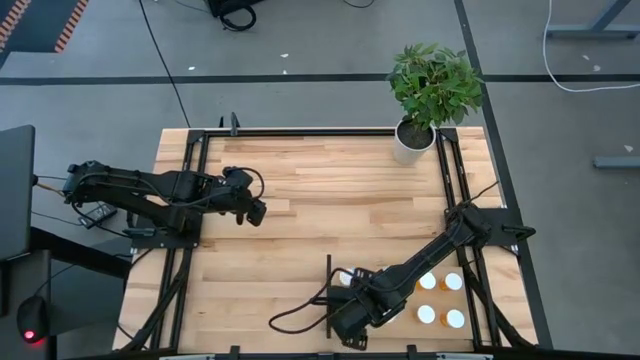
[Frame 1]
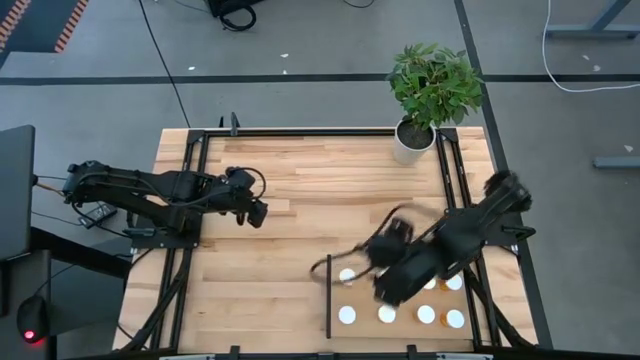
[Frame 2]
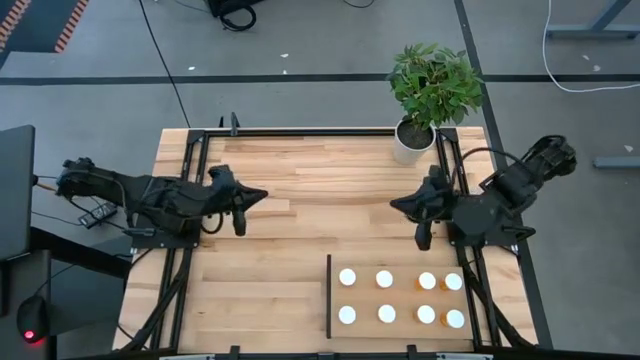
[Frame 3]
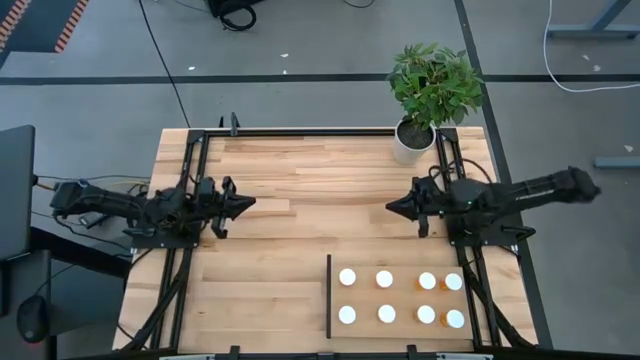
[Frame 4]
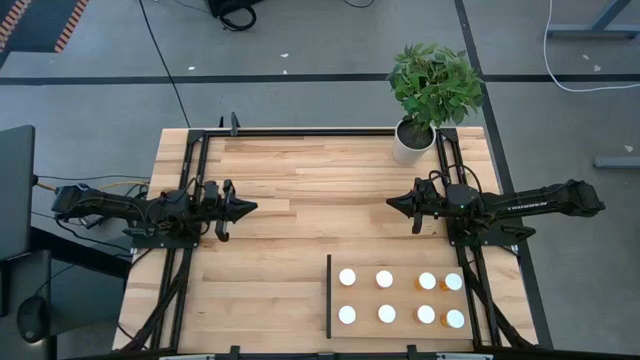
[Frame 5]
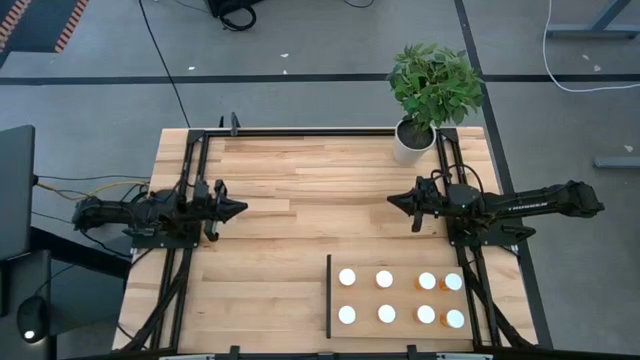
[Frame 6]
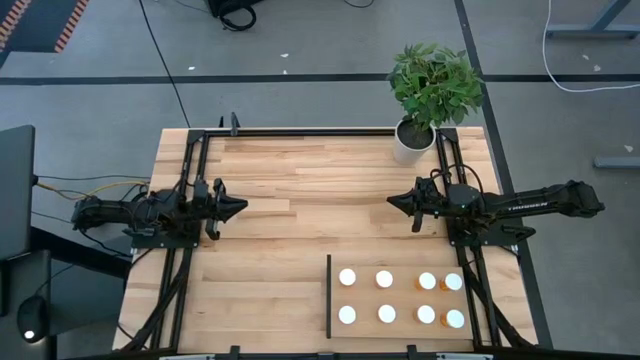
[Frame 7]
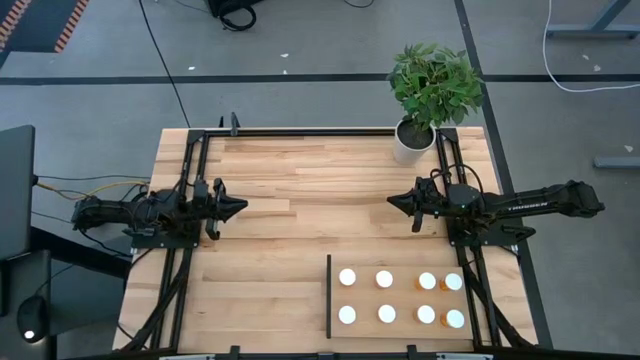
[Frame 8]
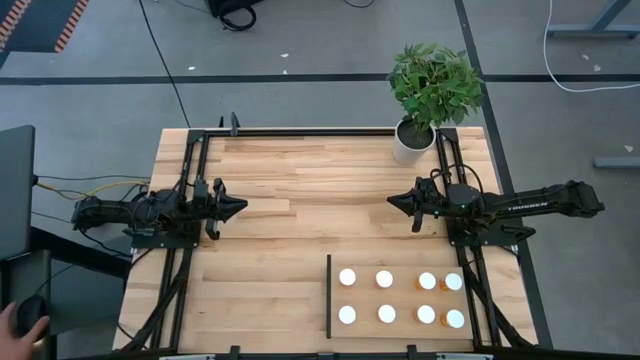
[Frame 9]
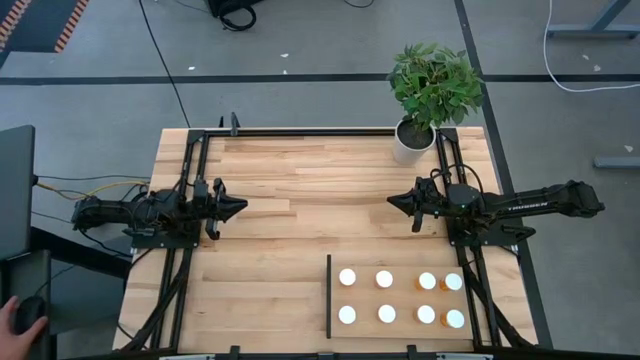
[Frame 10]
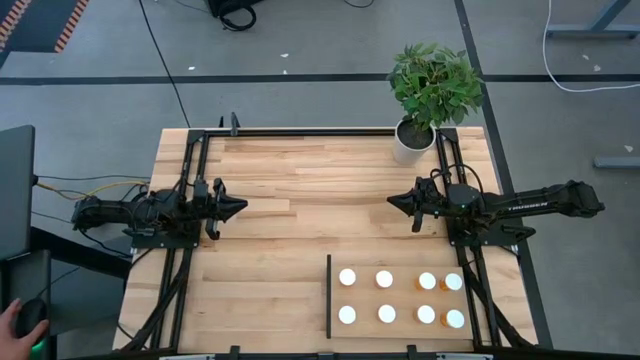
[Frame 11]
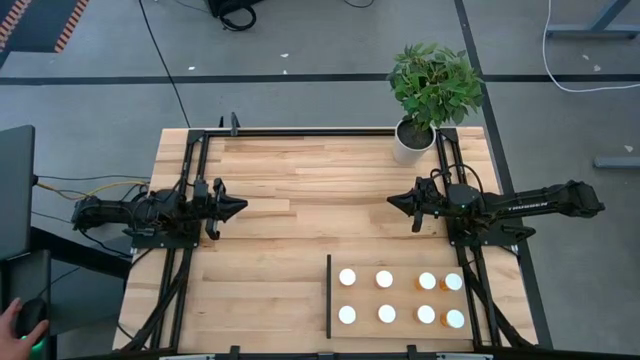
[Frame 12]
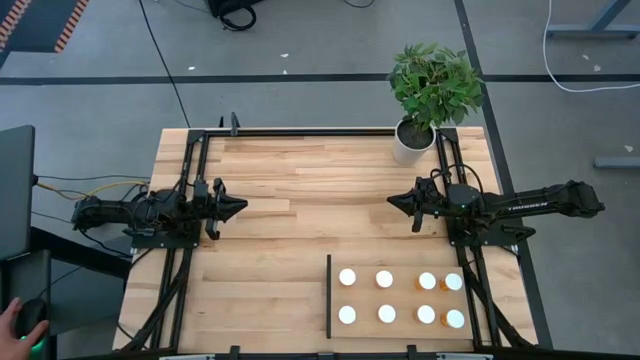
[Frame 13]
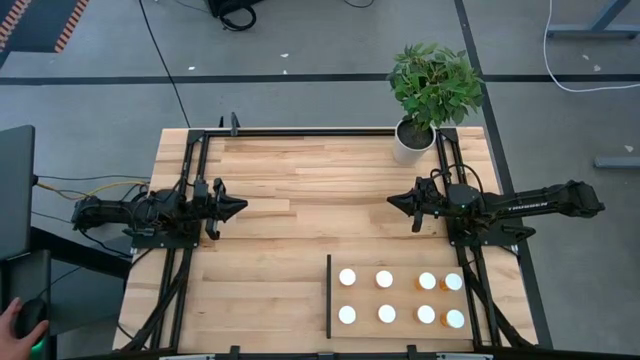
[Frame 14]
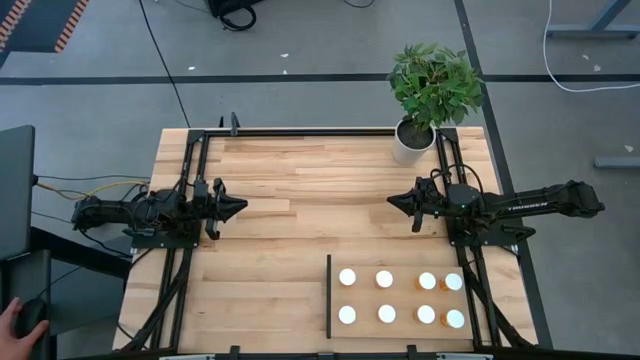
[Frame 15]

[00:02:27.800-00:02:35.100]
Task: Pick and place medicine bottles onto shelf by color
Return to Home Position

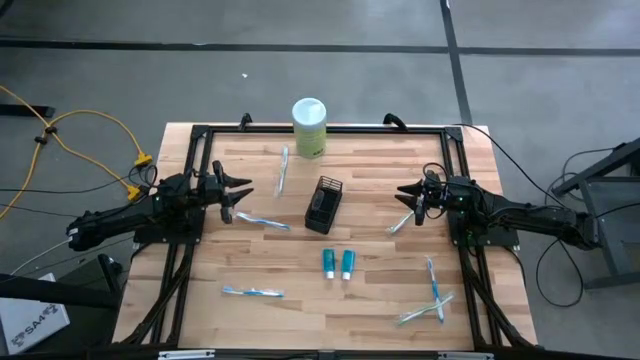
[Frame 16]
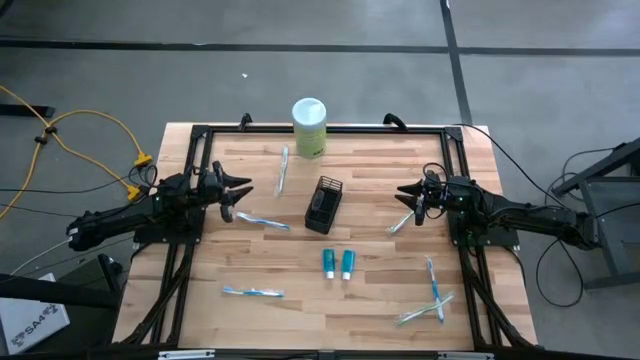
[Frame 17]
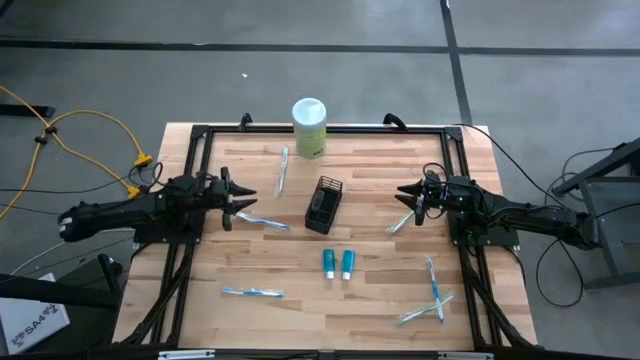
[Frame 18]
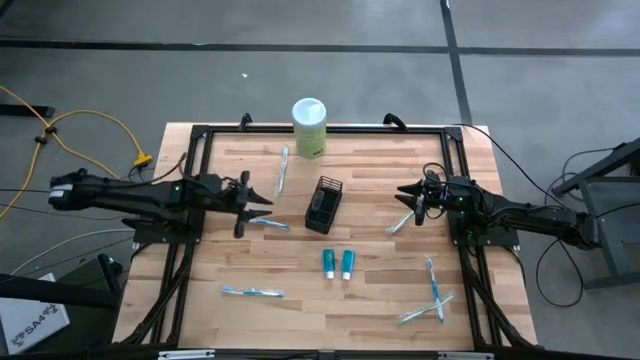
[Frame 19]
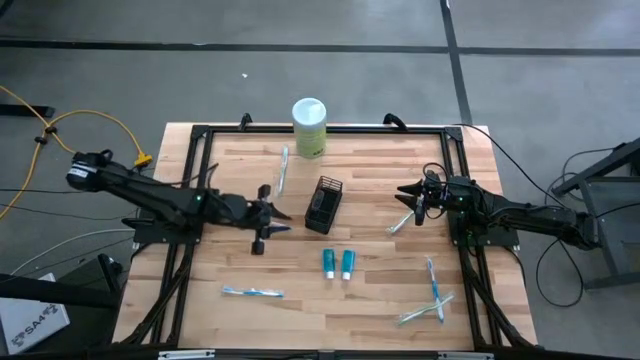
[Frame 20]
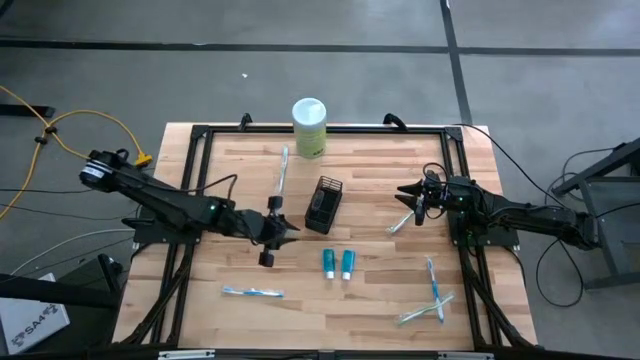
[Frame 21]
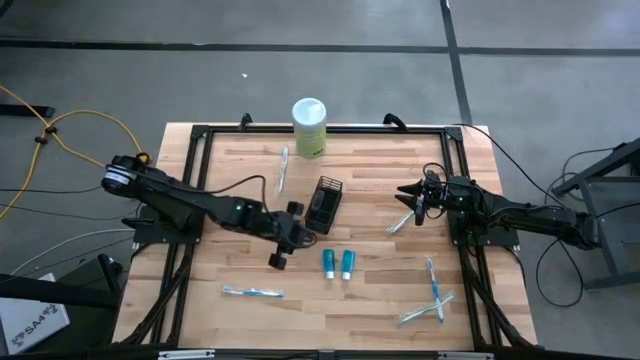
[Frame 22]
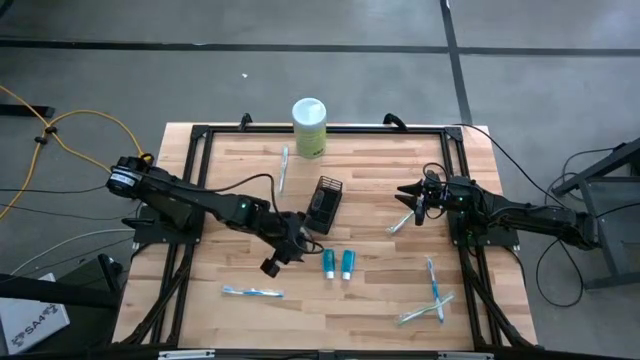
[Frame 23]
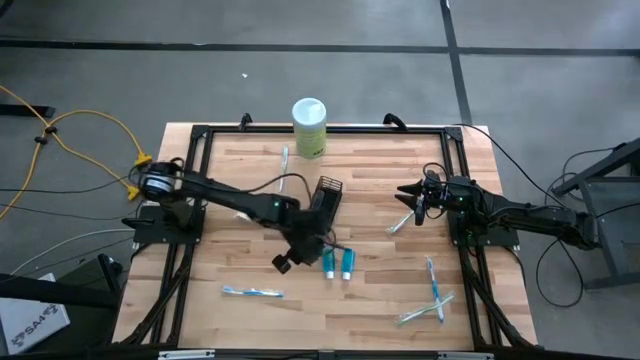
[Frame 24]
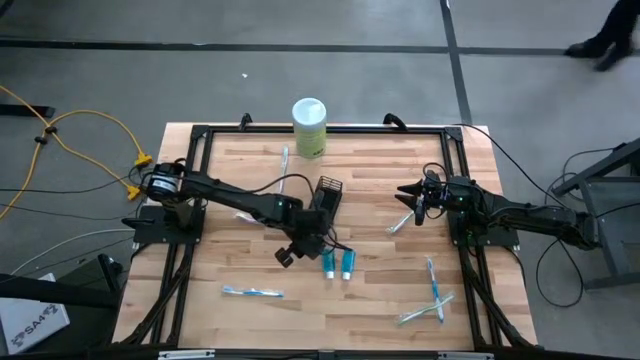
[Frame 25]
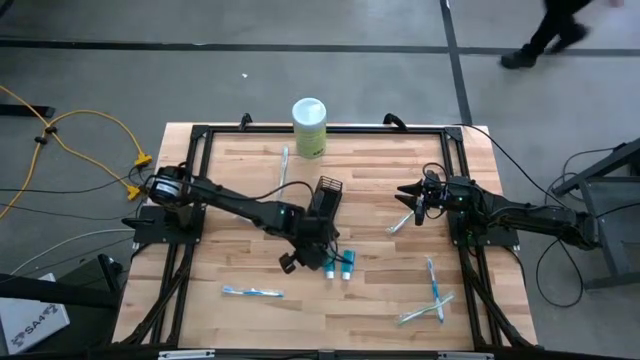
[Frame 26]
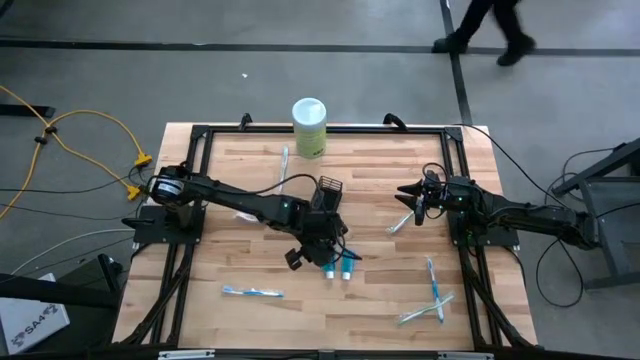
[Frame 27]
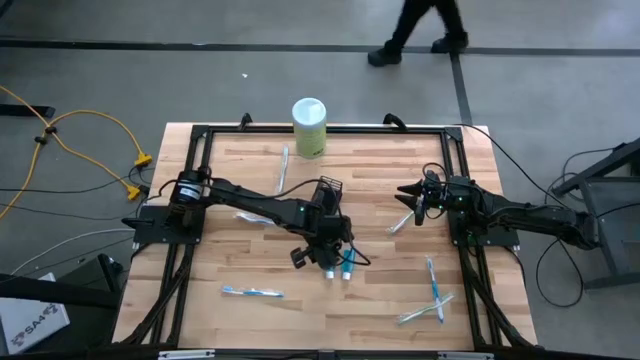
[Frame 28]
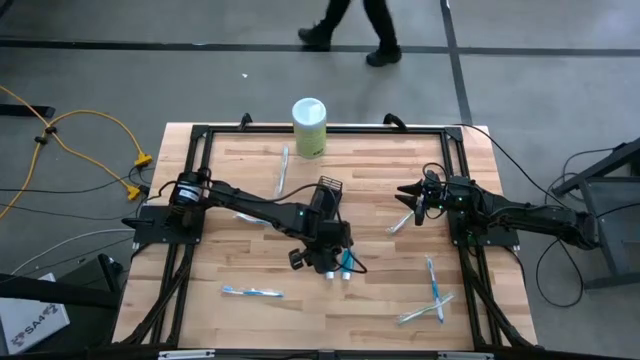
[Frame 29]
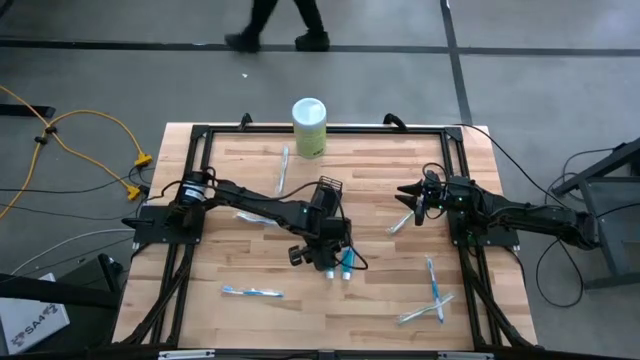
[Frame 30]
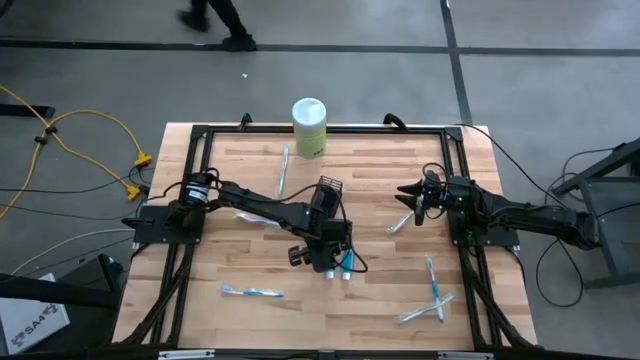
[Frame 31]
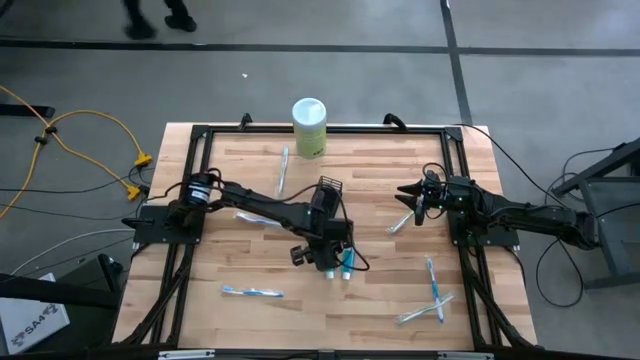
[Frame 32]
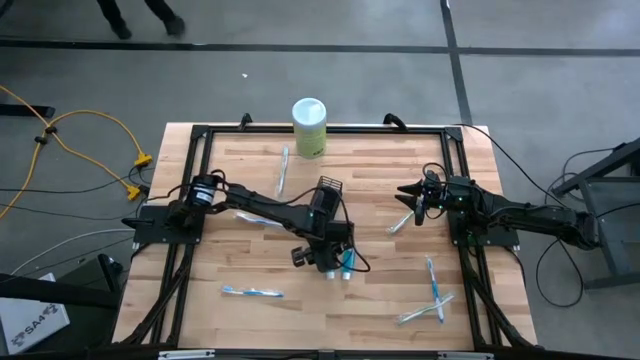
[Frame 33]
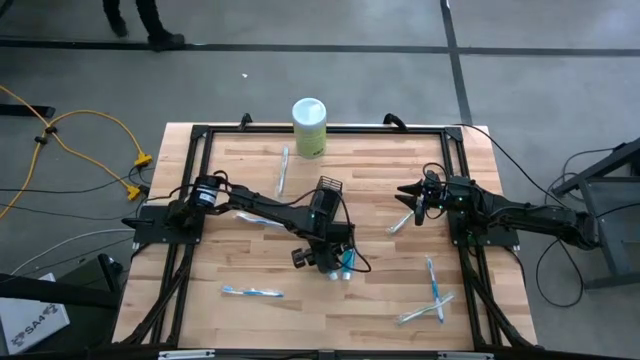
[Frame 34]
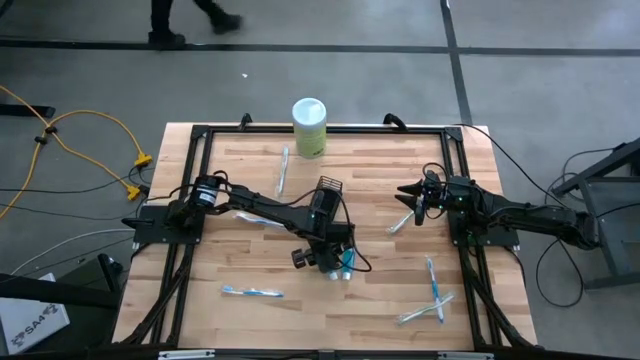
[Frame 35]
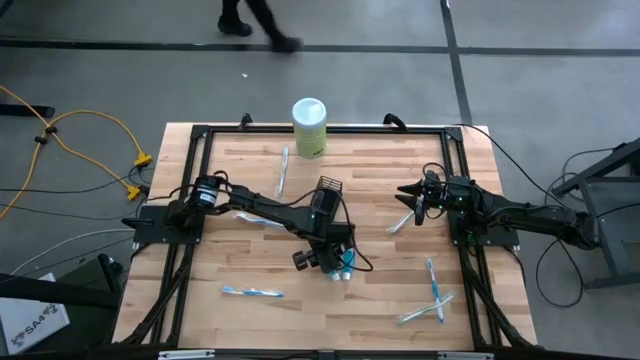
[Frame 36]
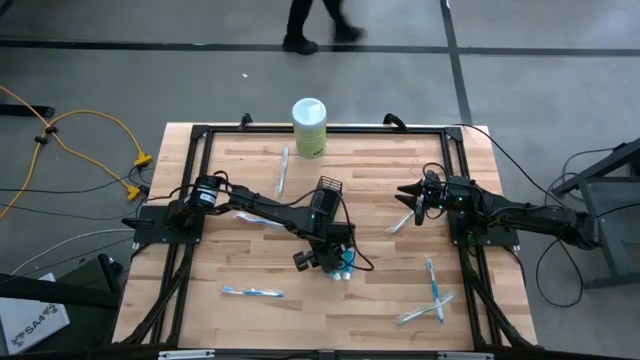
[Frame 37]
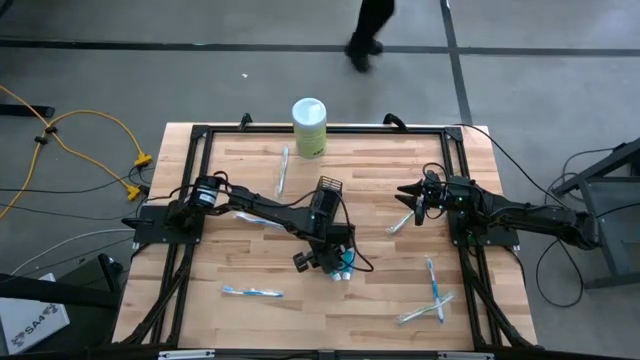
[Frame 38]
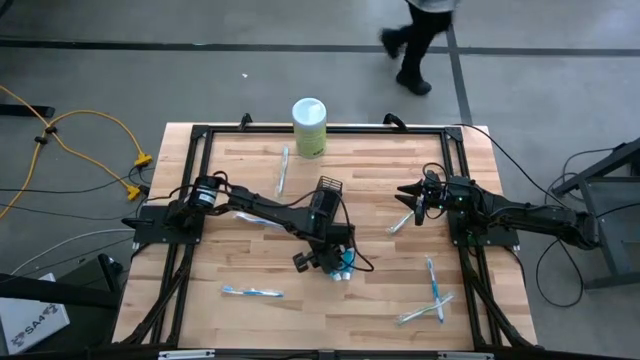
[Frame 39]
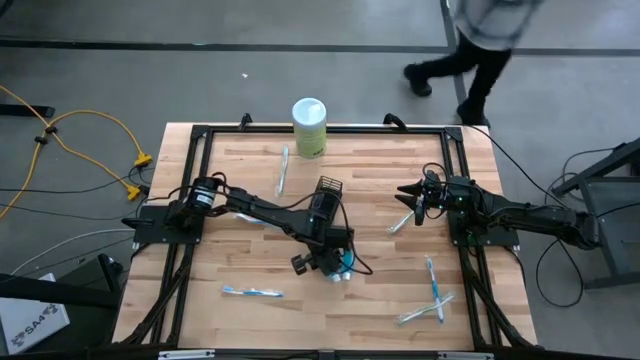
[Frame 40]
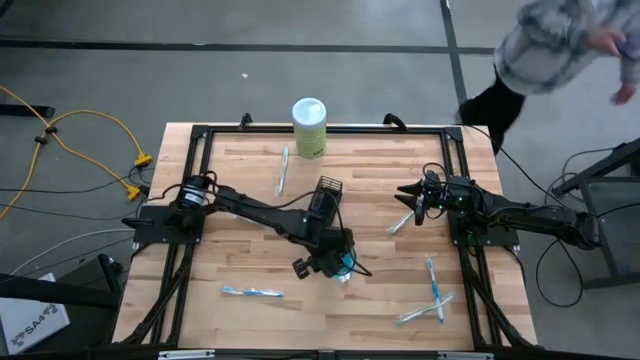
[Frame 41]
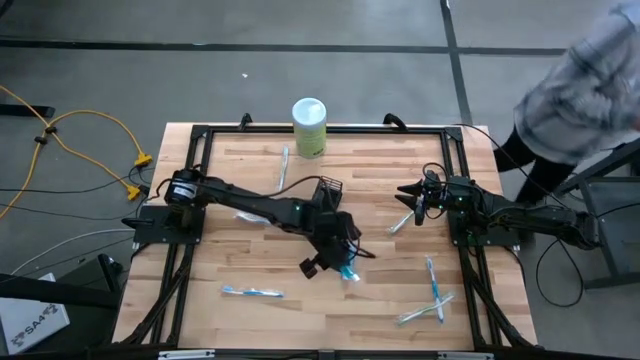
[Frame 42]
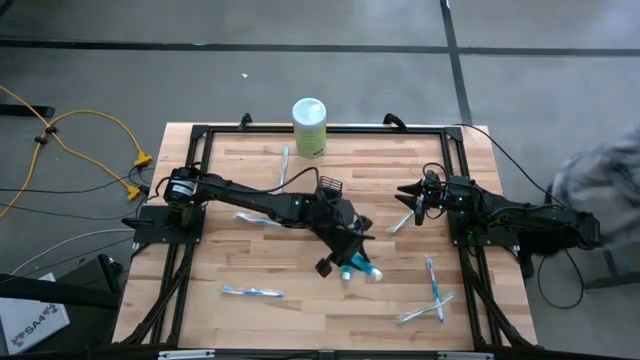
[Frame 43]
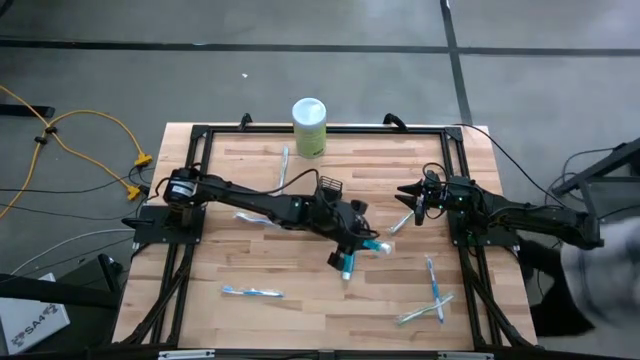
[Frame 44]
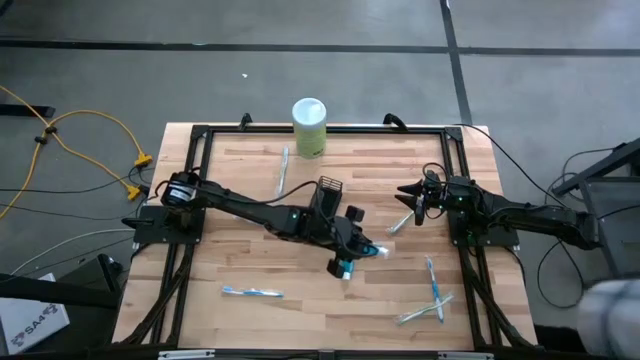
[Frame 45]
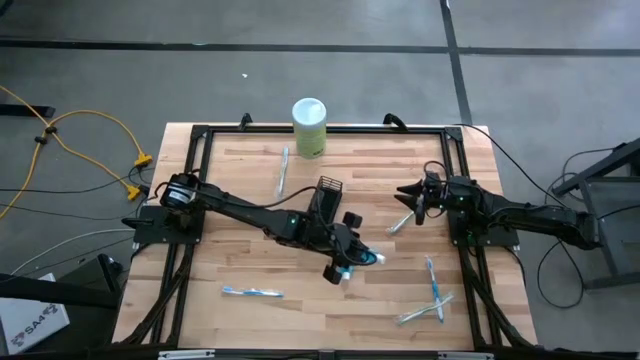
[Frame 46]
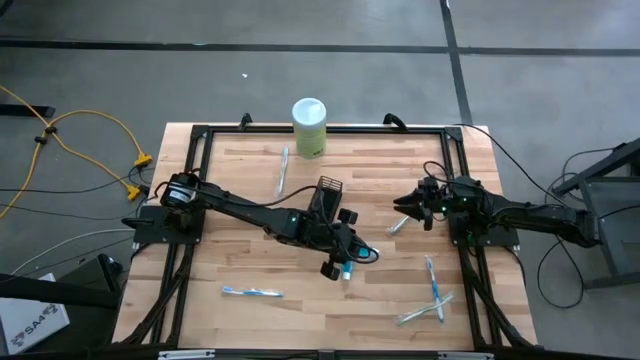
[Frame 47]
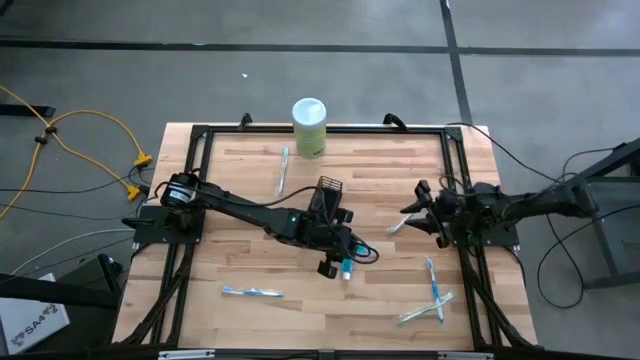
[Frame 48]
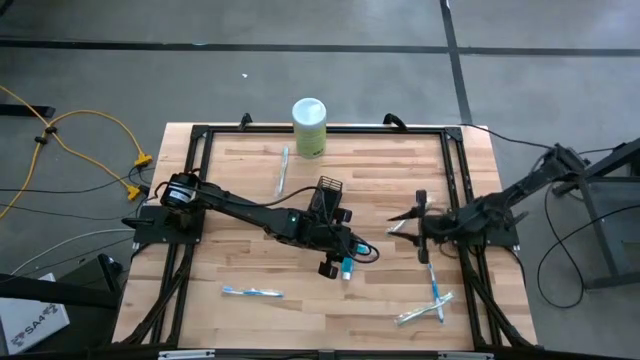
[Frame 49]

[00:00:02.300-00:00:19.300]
Task: Pick & Place toothbrushing station
Put the right blue mouthwash into the middle section of the black wire organizer
